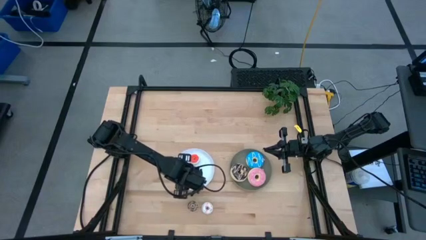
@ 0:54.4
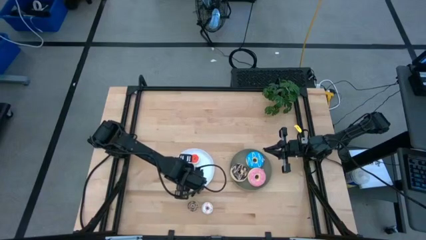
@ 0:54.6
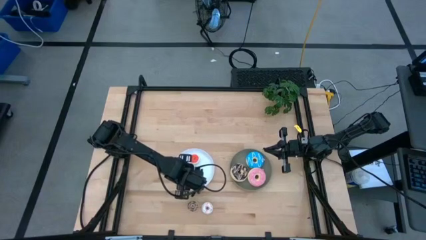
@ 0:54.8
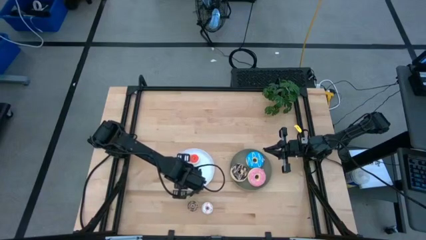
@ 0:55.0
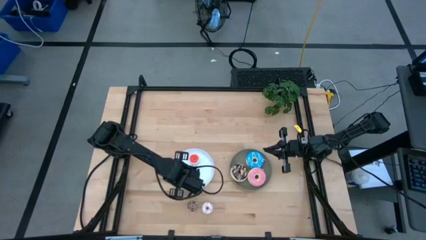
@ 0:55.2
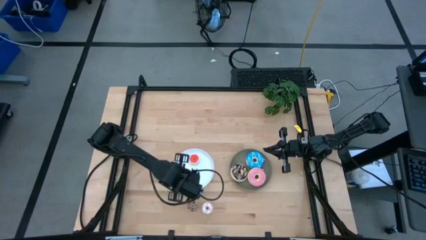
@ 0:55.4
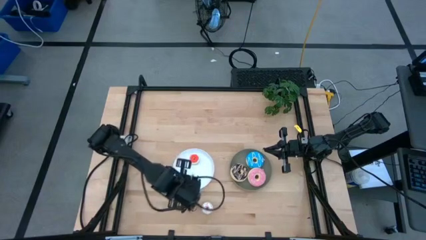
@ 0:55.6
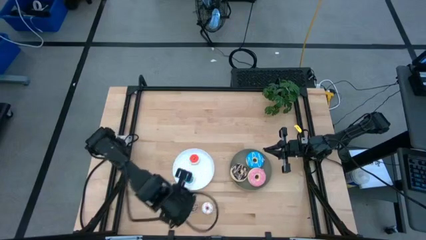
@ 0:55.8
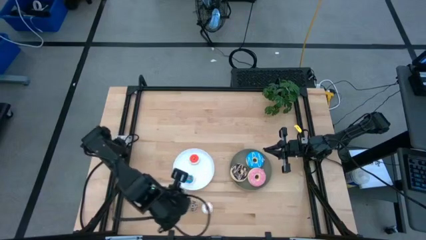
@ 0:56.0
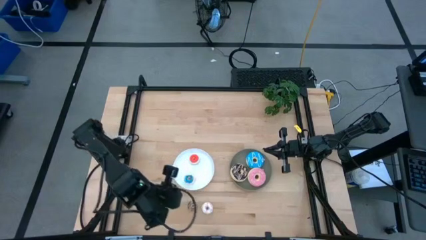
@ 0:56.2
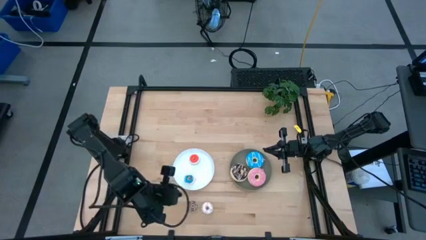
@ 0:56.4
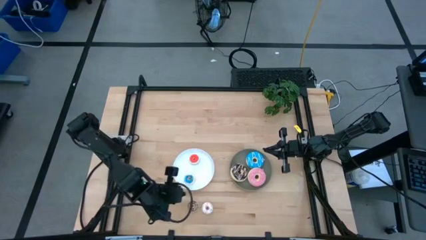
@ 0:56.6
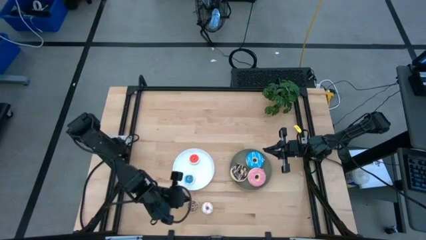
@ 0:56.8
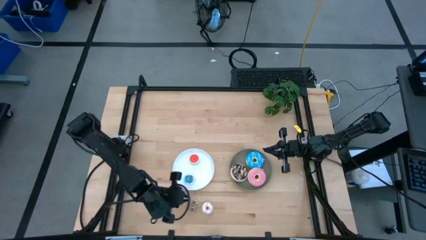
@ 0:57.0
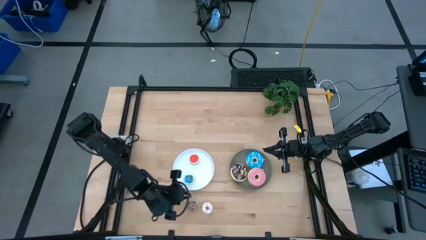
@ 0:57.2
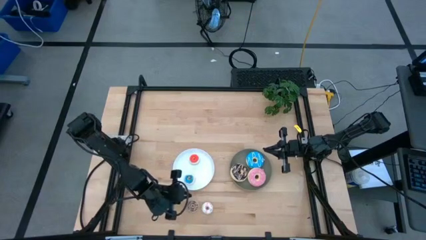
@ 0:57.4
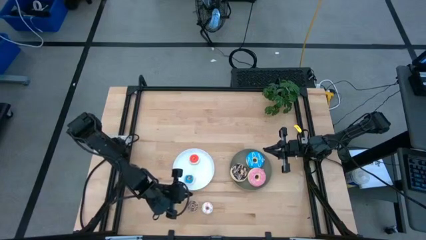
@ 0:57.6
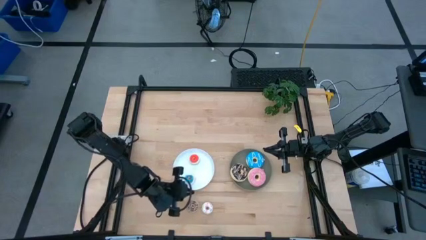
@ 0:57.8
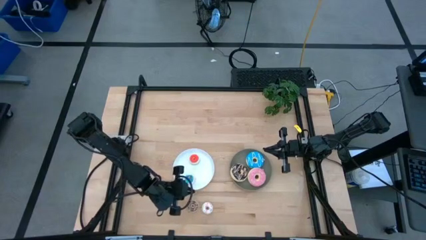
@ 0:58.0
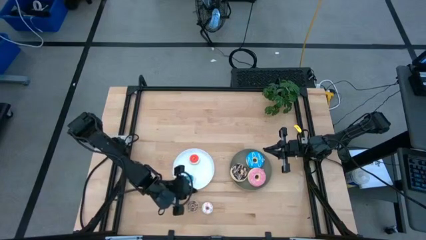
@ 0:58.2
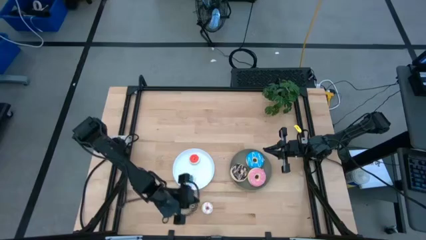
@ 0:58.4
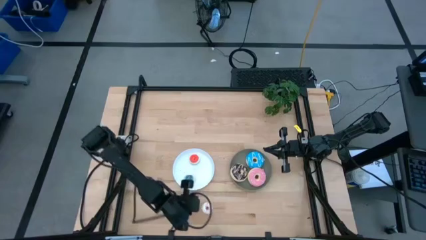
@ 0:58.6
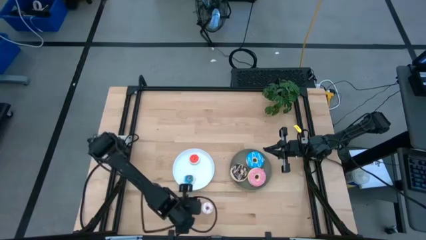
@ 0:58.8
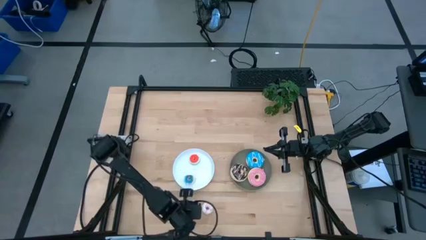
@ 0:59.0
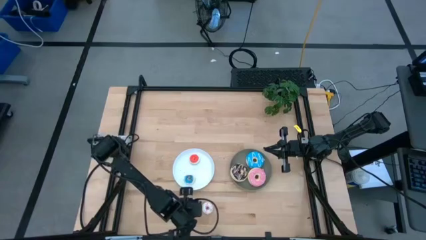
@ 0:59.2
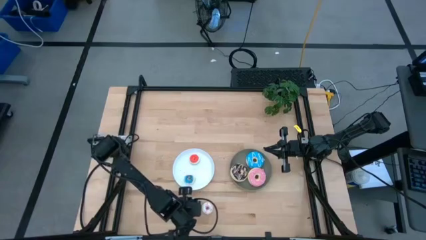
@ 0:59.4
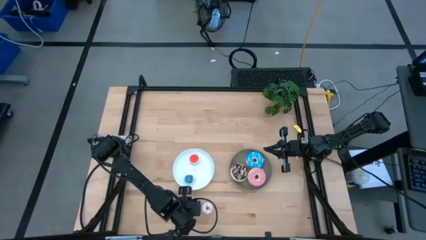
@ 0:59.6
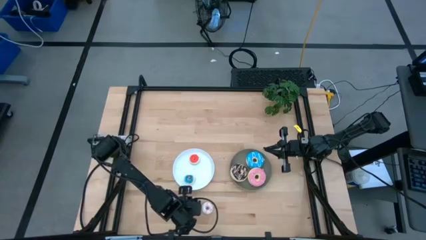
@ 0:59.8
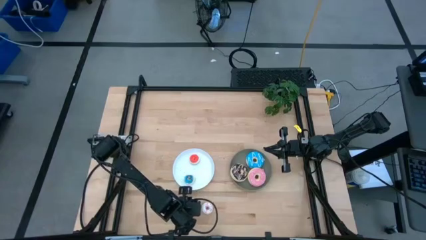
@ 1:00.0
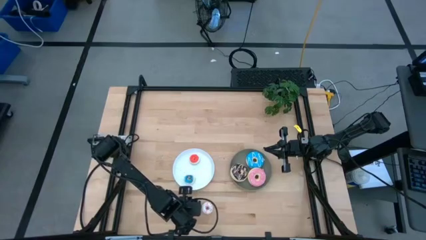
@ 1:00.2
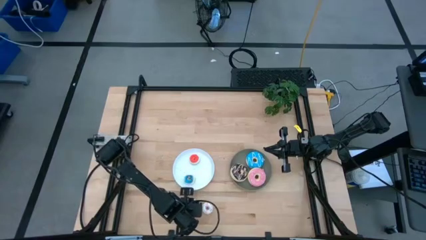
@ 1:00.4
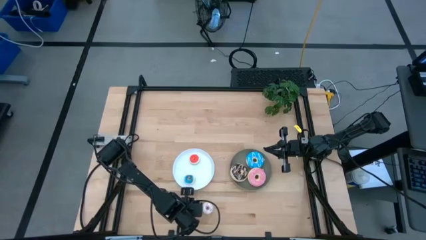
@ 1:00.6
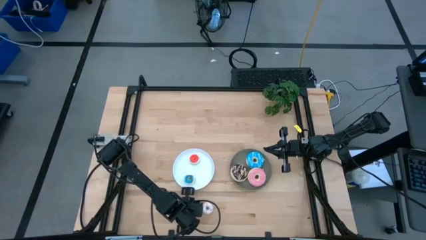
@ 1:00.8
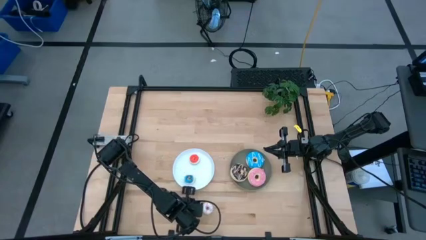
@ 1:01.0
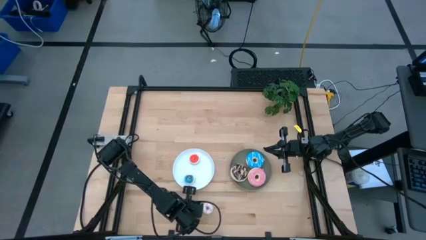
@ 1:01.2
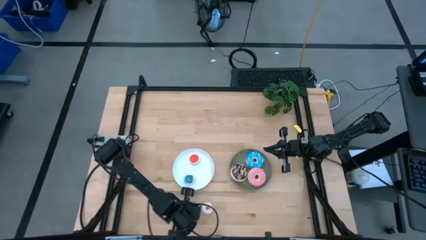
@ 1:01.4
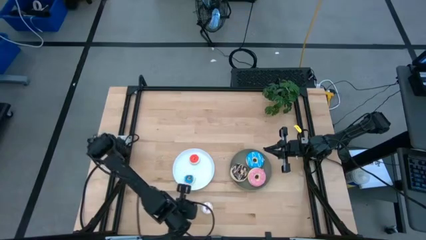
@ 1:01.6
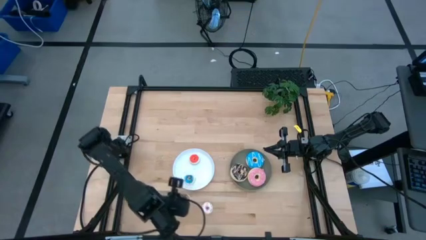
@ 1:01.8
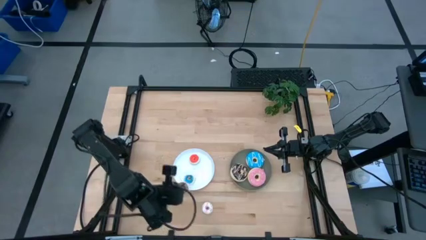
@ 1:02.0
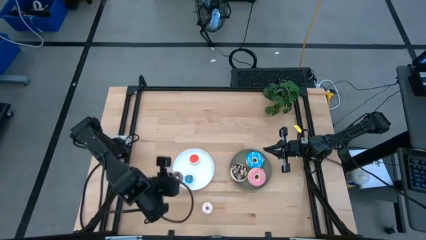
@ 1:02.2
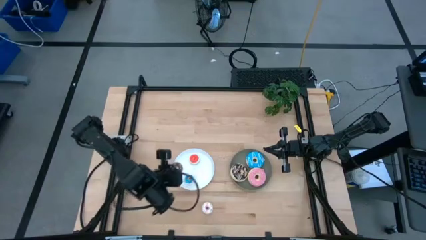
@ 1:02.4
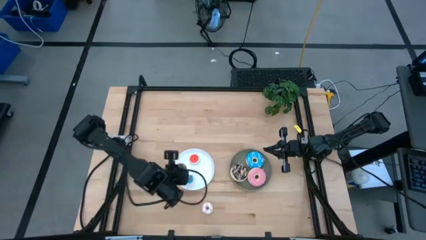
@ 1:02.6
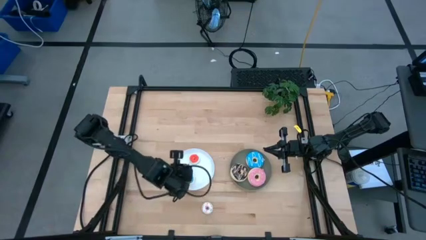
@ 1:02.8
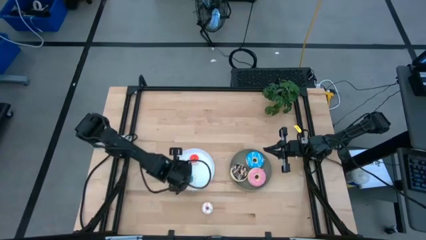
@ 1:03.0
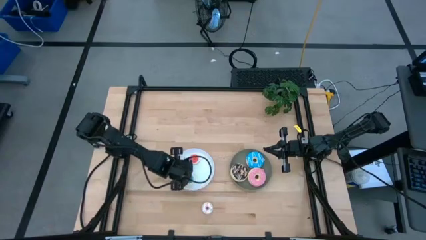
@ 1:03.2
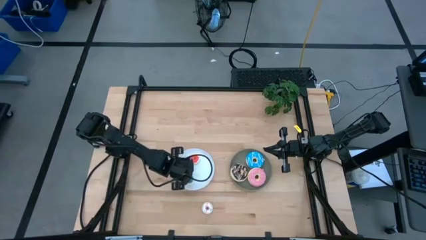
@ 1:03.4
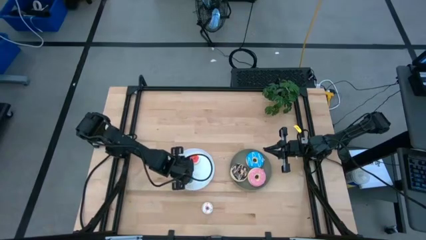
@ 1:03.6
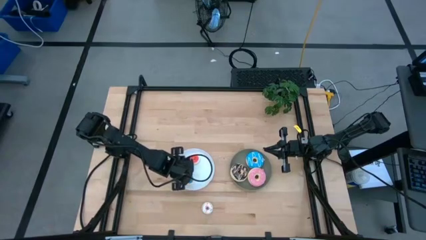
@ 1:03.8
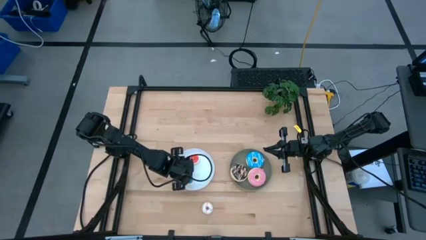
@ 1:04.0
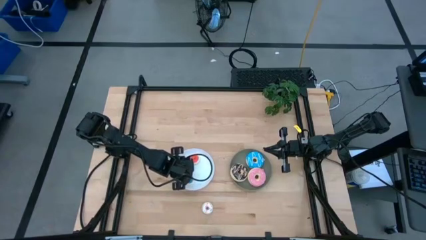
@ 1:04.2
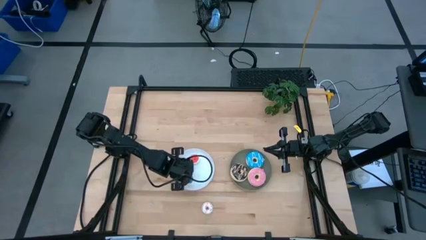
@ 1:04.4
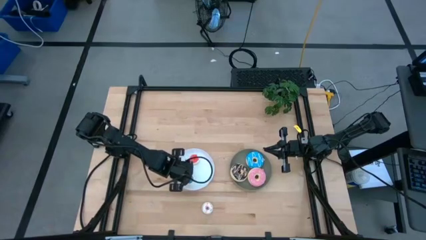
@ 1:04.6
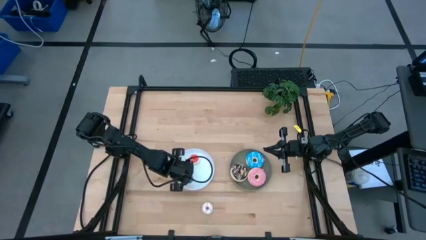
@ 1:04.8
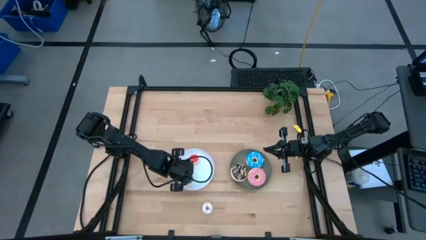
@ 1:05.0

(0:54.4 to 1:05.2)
Task: Pick & Place donuts
Put the small brown donut on the white plate

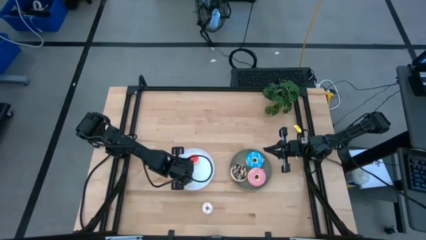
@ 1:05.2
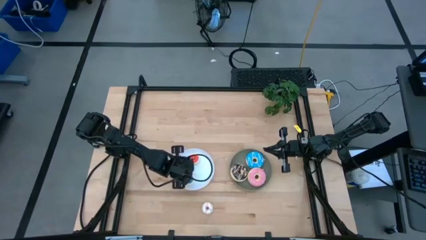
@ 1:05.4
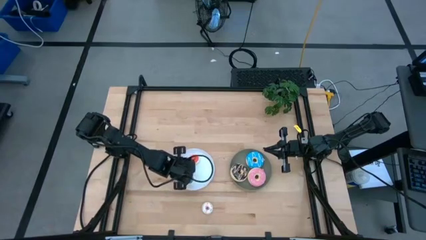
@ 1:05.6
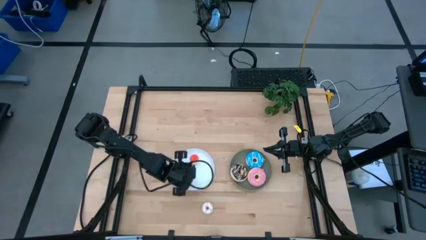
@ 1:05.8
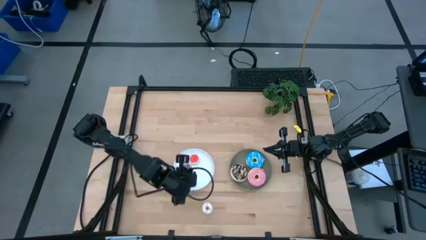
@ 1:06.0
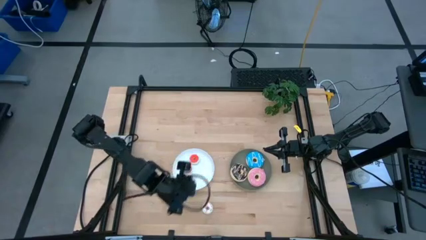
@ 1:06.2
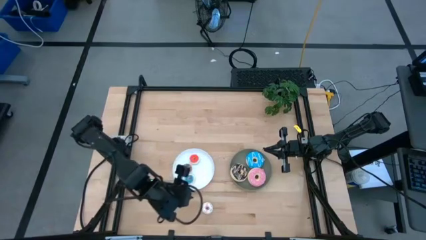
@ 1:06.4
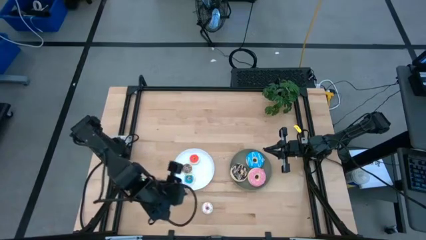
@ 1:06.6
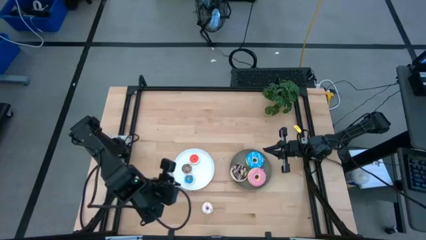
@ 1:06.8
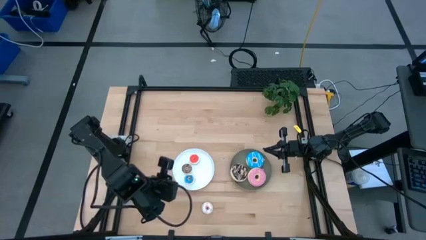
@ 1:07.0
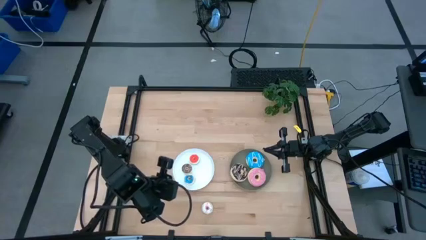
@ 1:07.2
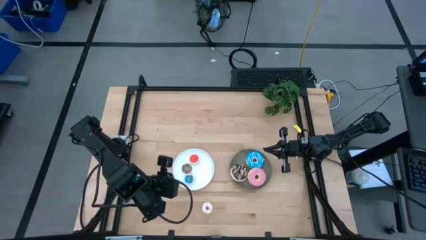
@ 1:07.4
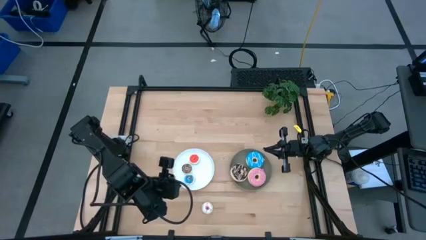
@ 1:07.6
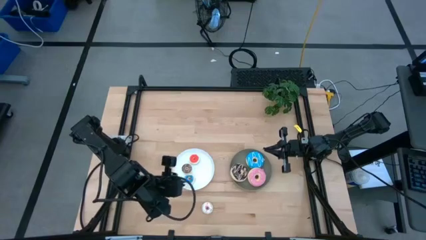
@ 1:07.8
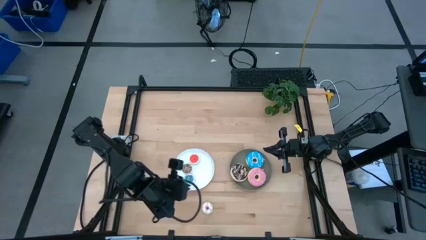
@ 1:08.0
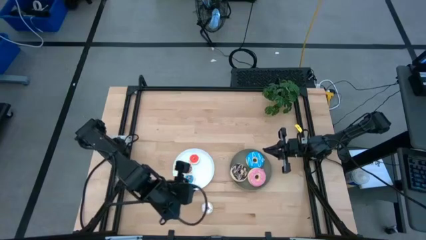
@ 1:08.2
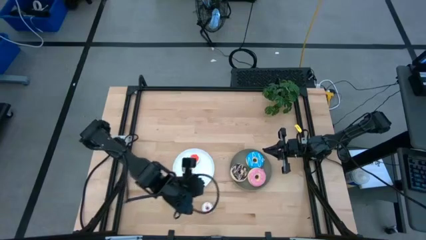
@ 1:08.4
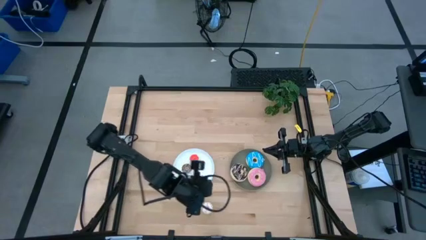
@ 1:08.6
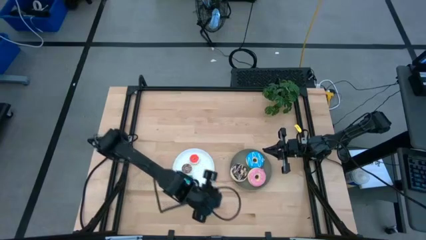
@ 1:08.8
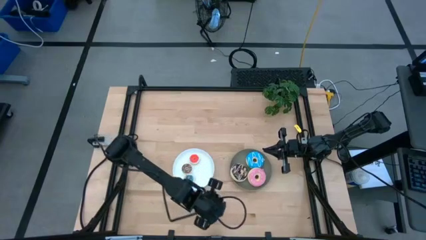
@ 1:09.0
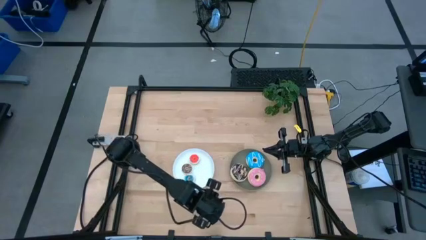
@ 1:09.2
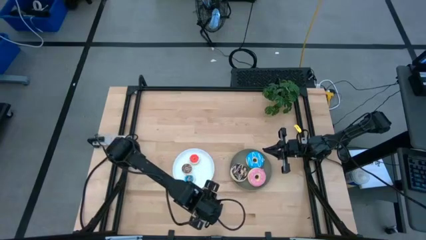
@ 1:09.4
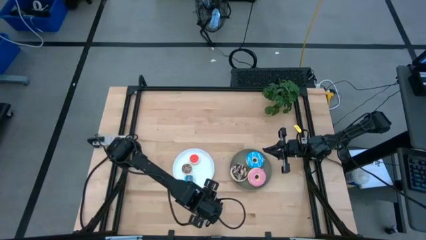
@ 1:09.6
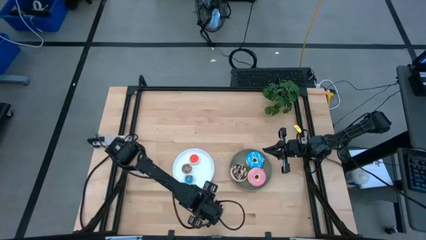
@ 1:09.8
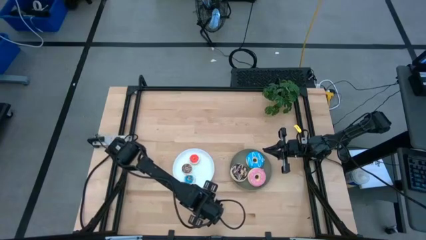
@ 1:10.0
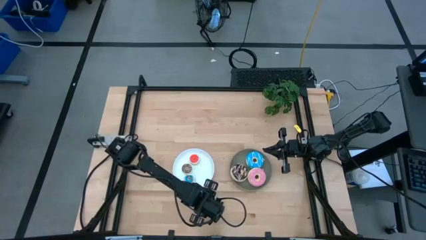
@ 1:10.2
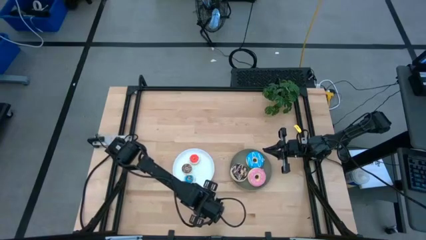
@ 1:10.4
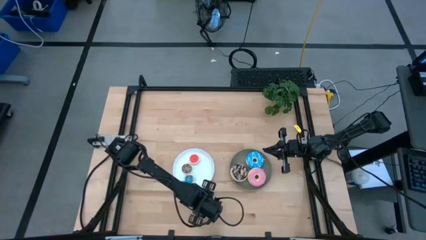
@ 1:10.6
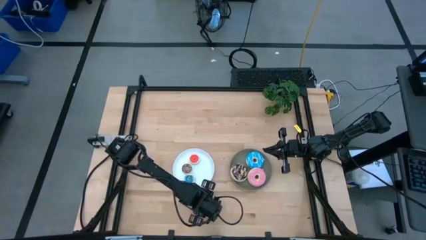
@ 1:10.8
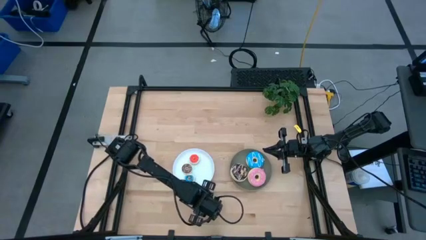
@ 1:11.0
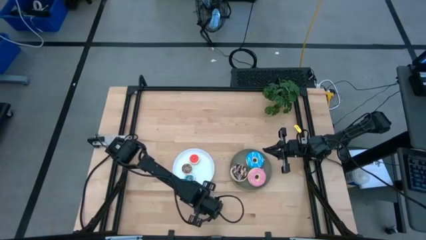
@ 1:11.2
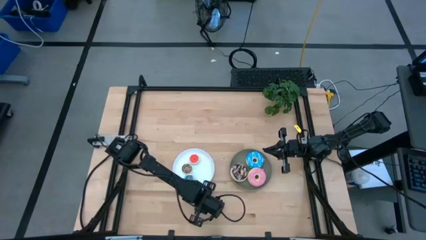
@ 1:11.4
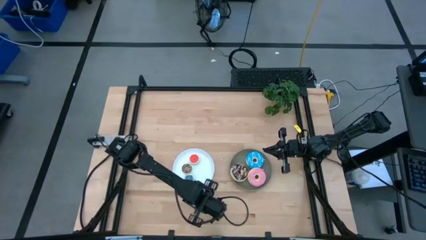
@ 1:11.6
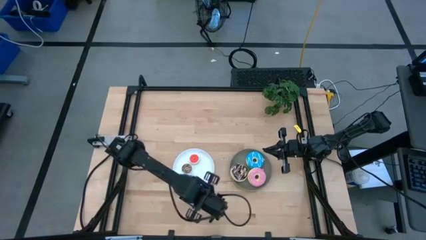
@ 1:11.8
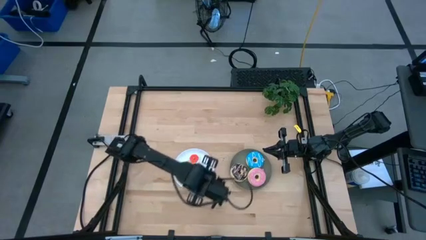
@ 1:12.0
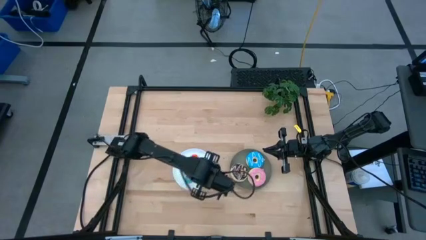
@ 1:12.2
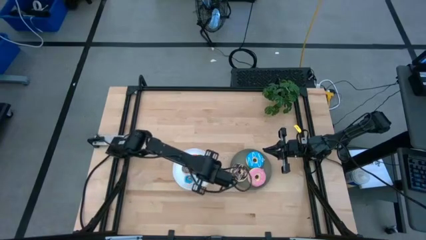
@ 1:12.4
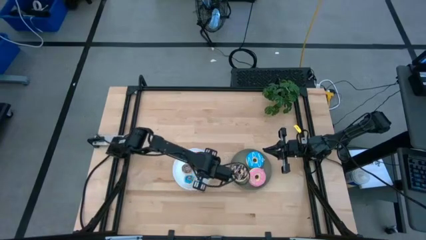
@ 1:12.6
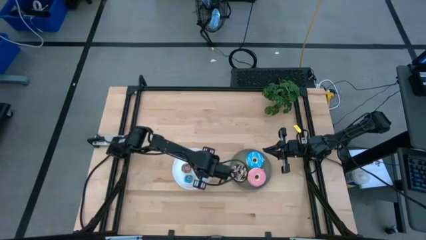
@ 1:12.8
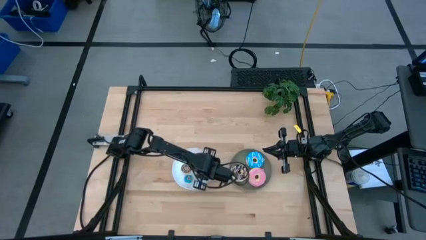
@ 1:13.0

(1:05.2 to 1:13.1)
Put the small white donut on the white plate
